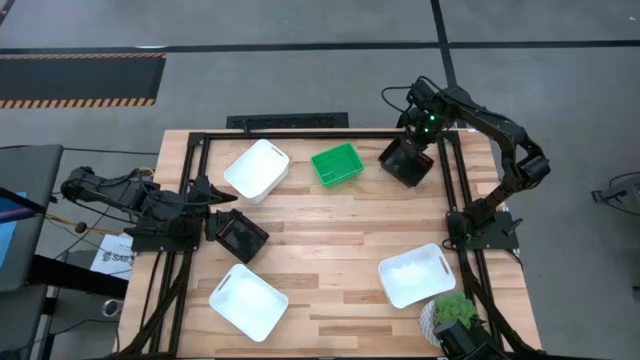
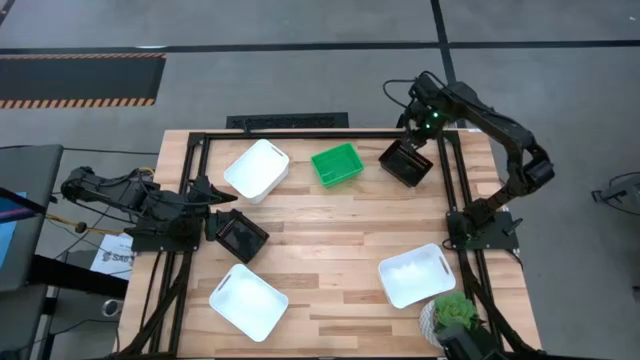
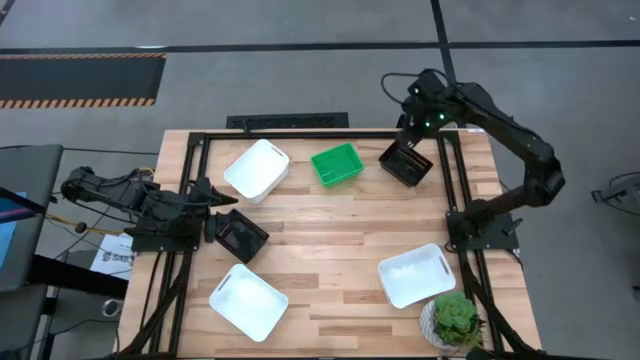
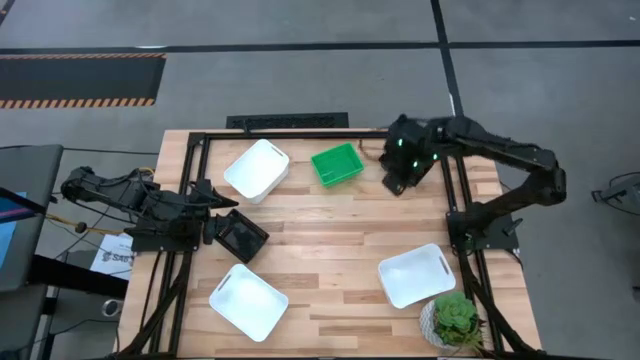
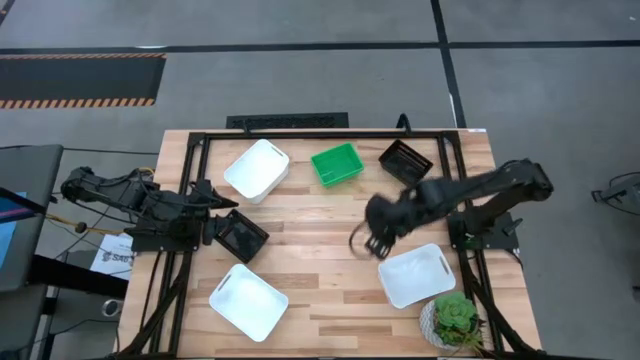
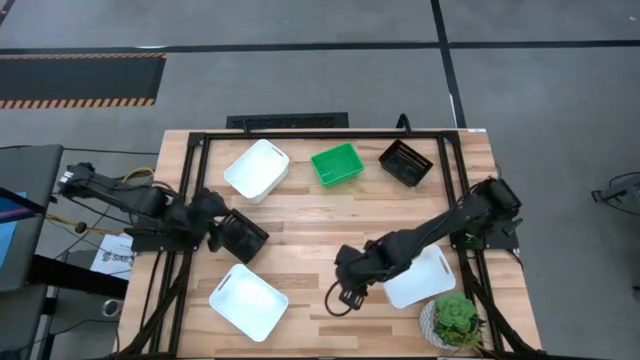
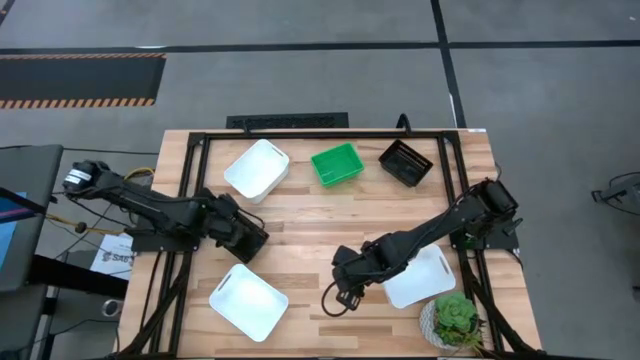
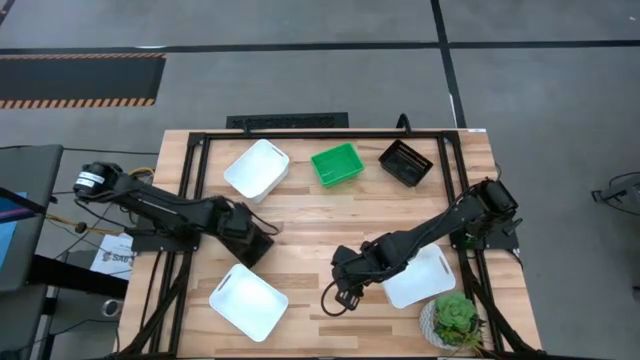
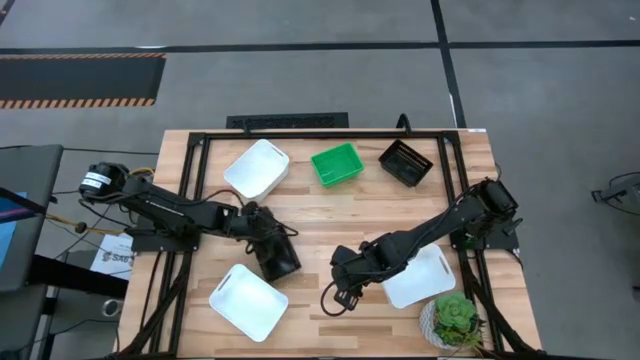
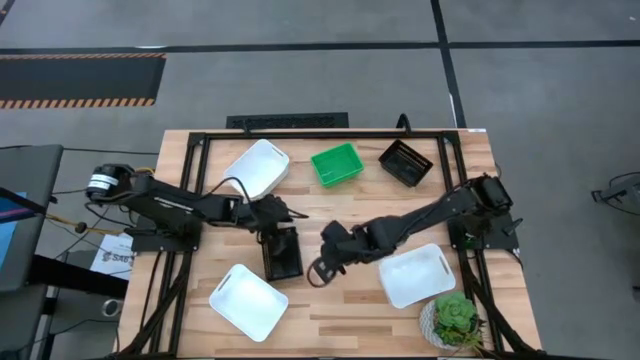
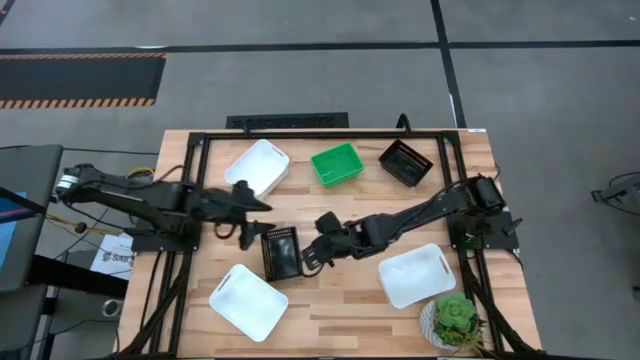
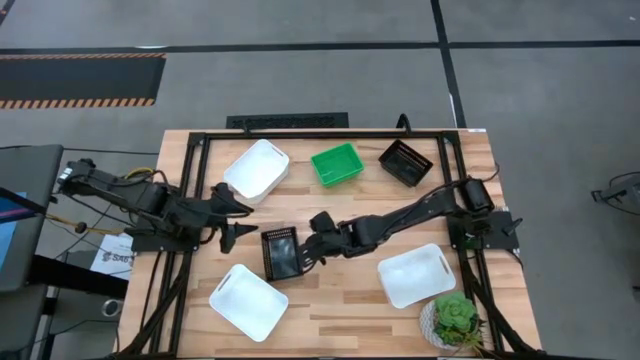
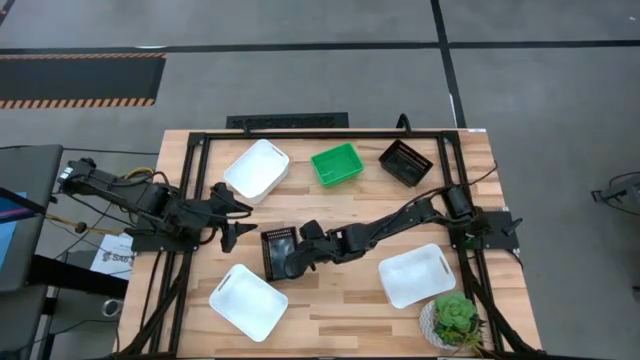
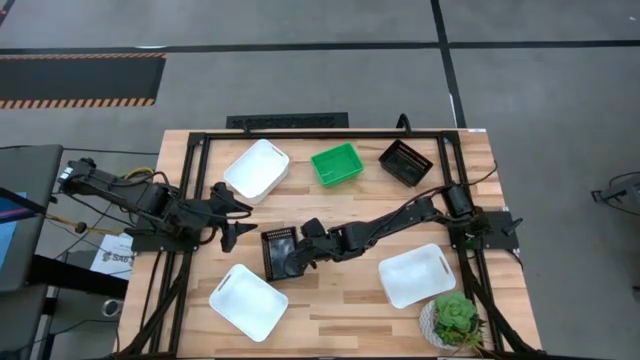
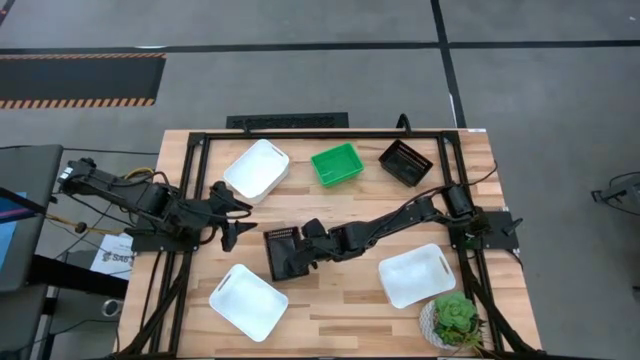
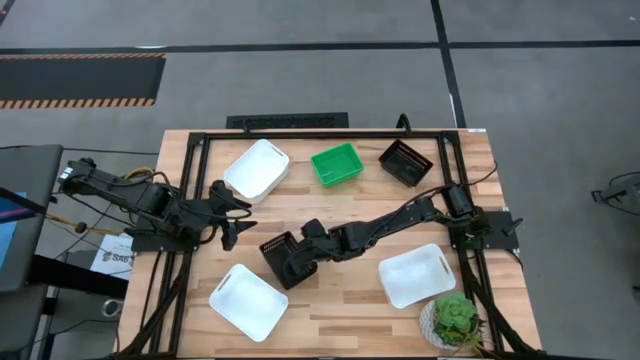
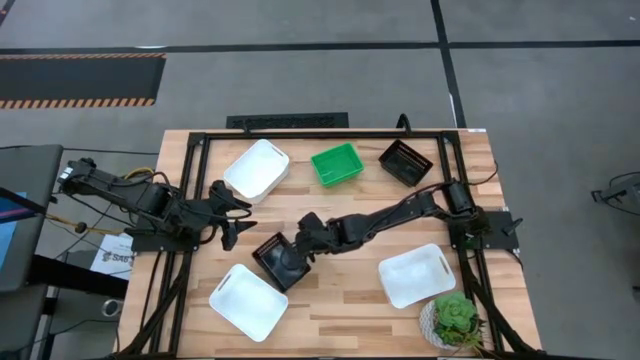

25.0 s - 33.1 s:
Stack the black bin on top of the black bins

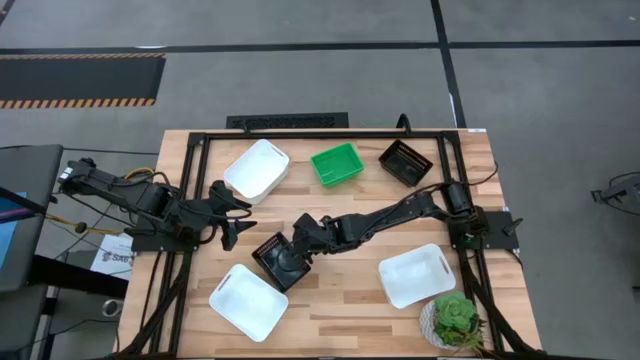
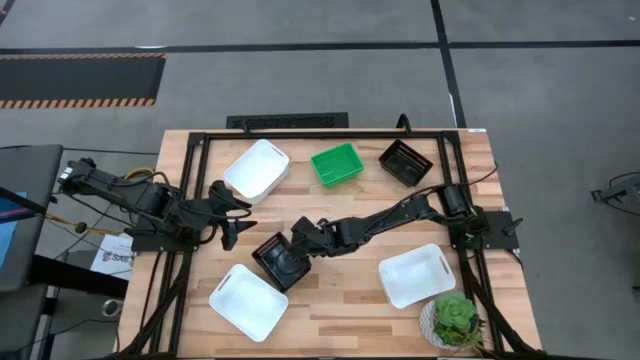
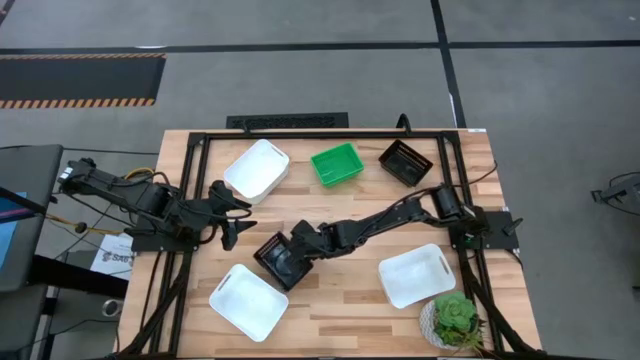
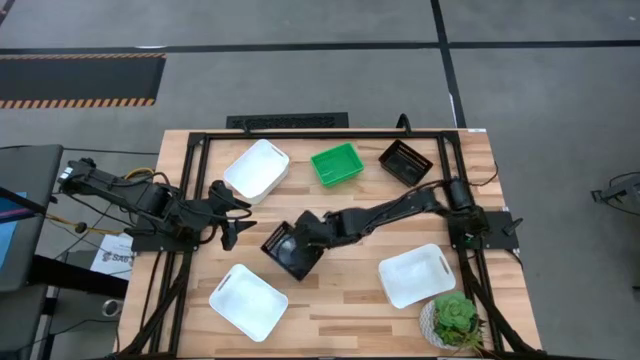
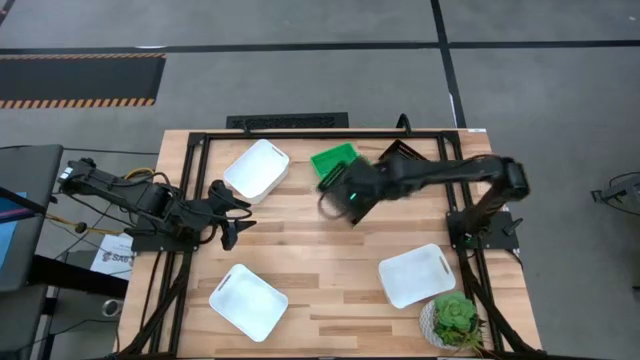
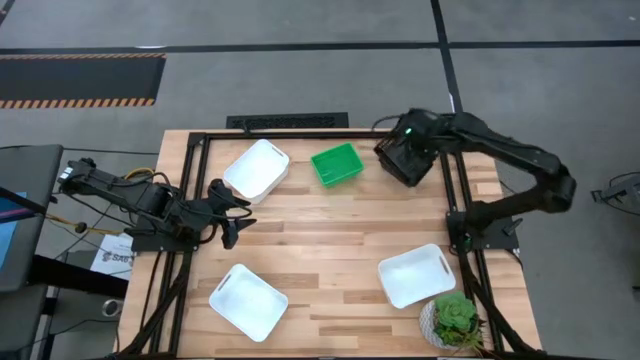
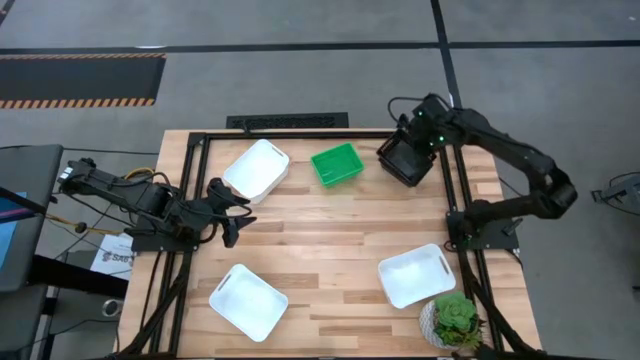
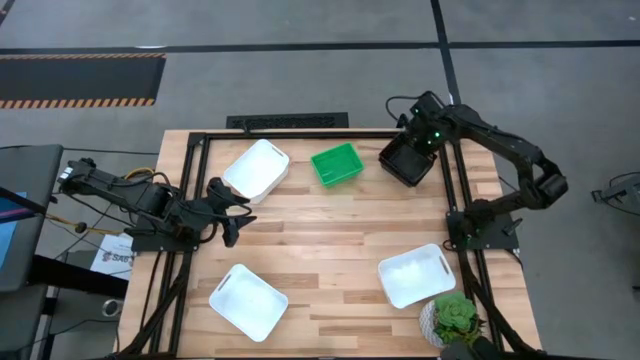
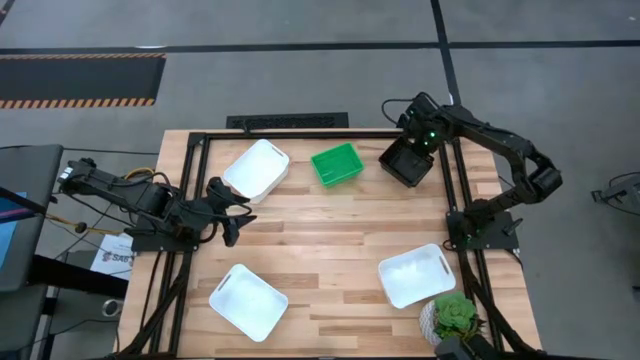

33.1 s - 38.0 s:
Stack the black bin on top of the black bins
